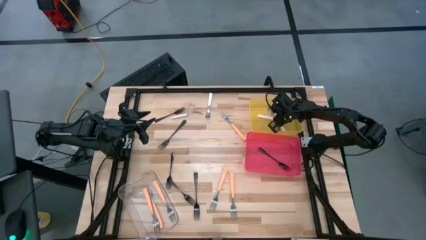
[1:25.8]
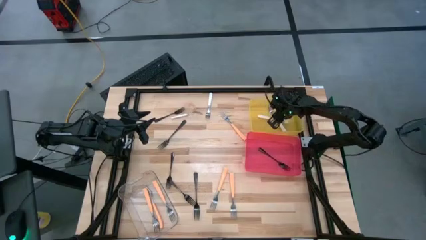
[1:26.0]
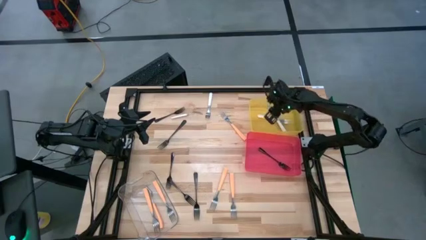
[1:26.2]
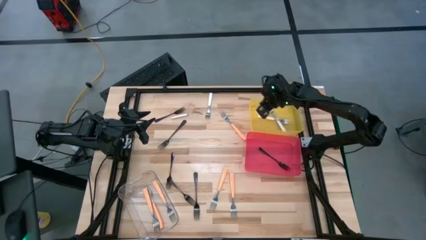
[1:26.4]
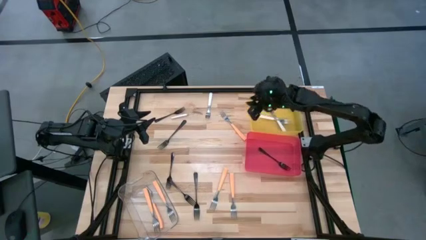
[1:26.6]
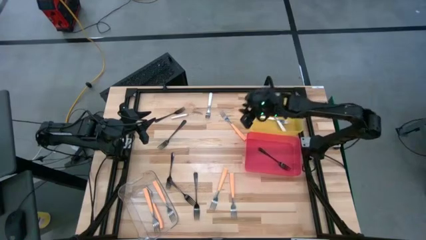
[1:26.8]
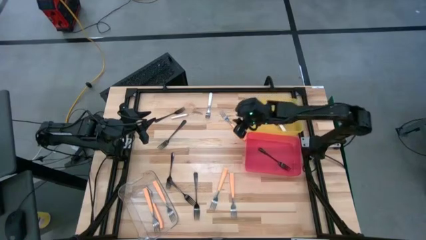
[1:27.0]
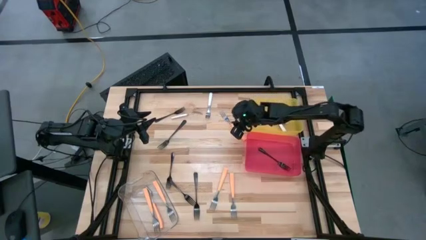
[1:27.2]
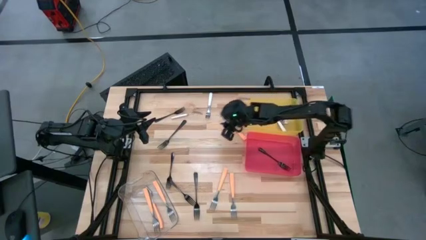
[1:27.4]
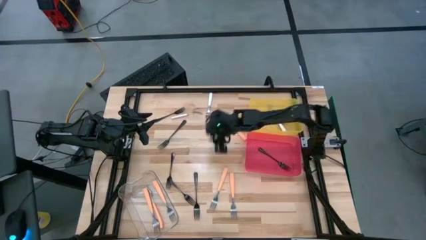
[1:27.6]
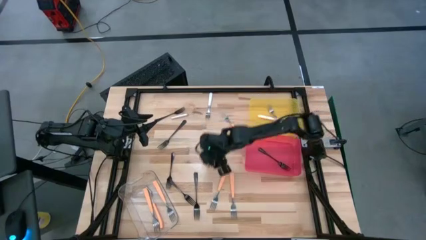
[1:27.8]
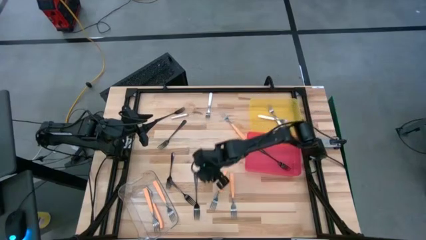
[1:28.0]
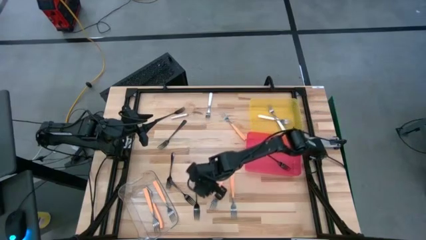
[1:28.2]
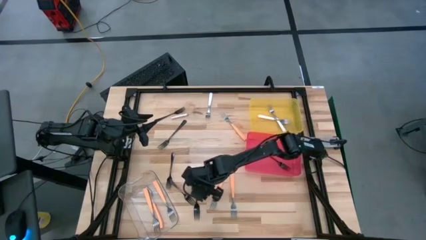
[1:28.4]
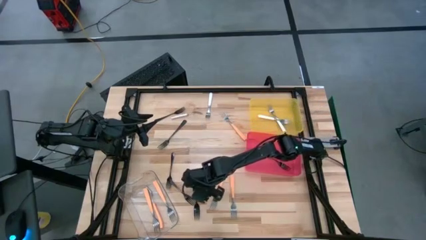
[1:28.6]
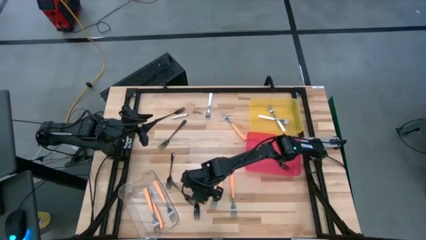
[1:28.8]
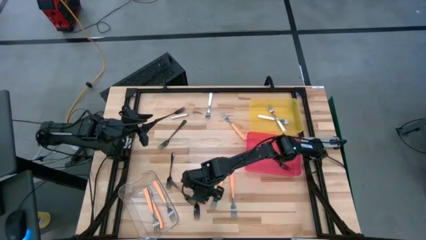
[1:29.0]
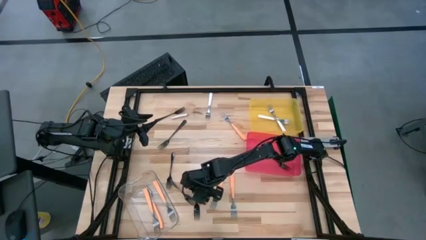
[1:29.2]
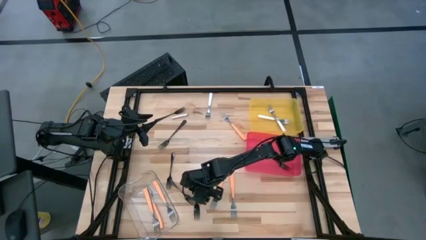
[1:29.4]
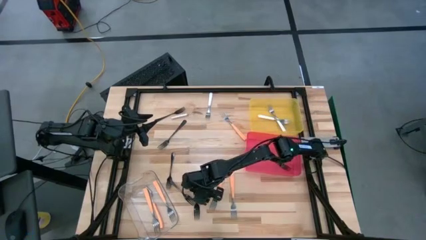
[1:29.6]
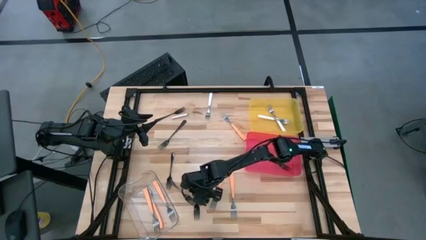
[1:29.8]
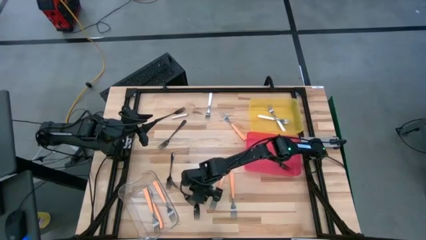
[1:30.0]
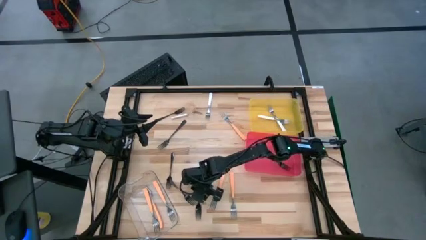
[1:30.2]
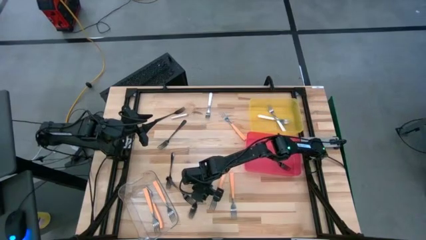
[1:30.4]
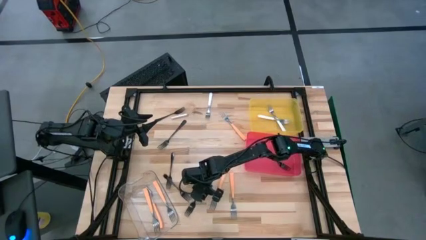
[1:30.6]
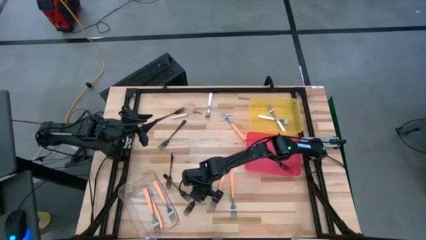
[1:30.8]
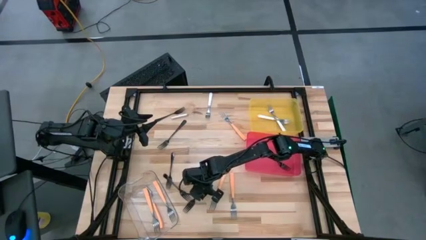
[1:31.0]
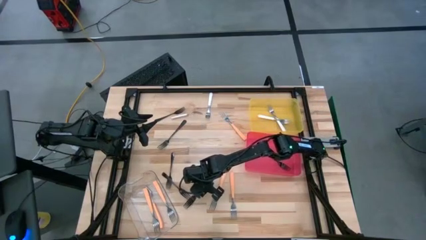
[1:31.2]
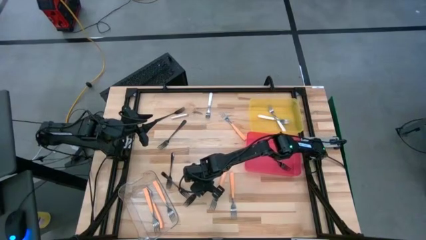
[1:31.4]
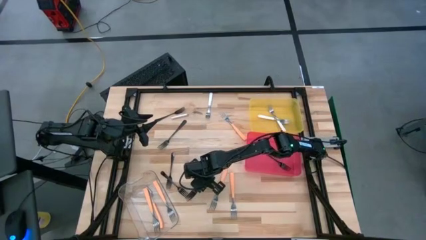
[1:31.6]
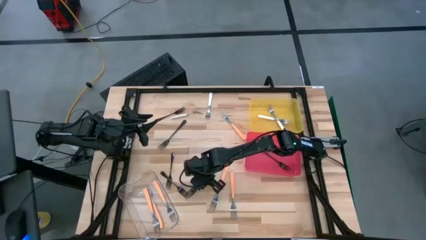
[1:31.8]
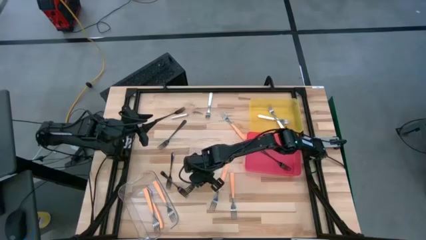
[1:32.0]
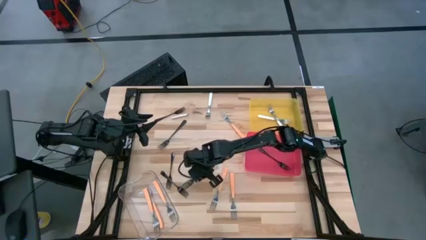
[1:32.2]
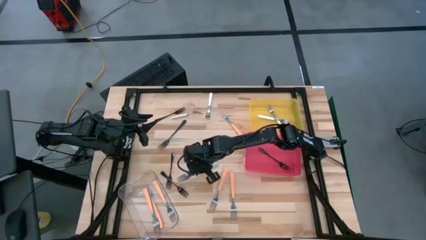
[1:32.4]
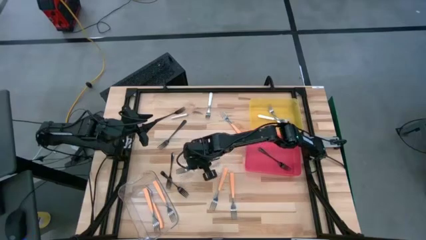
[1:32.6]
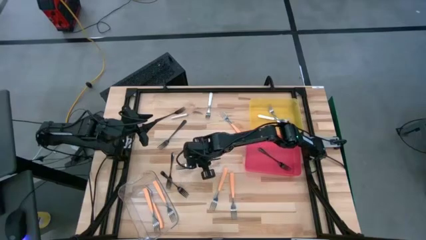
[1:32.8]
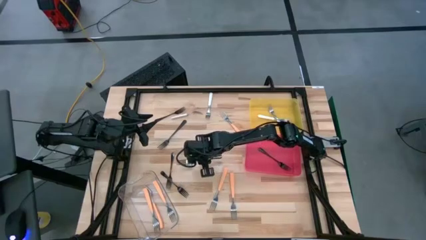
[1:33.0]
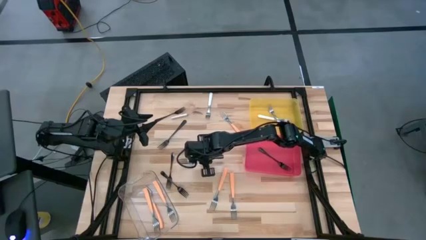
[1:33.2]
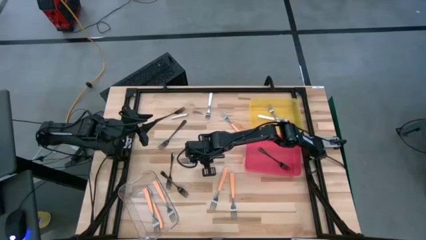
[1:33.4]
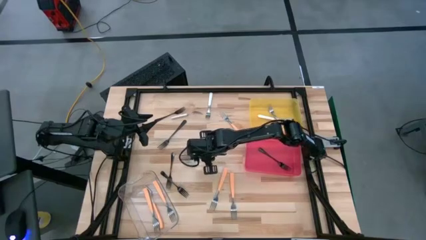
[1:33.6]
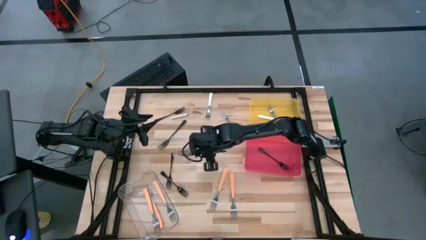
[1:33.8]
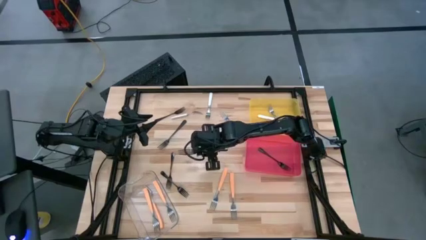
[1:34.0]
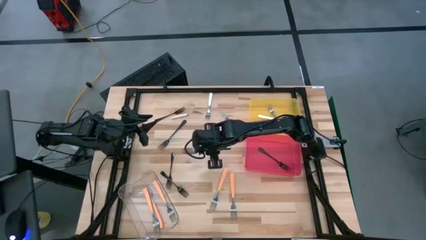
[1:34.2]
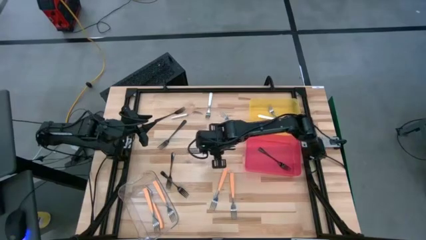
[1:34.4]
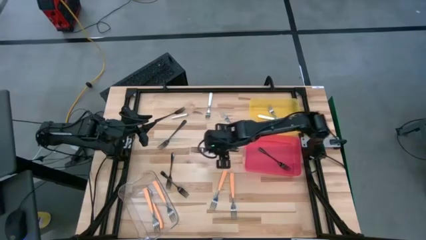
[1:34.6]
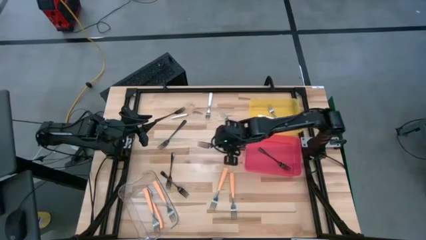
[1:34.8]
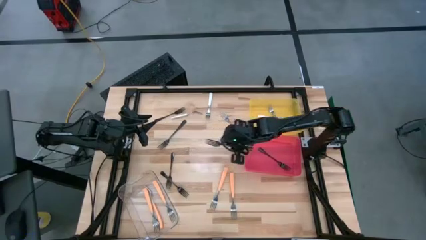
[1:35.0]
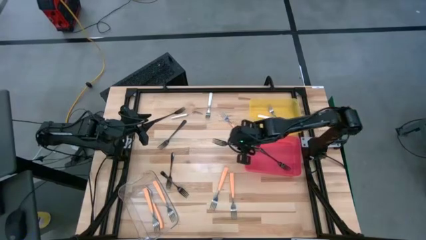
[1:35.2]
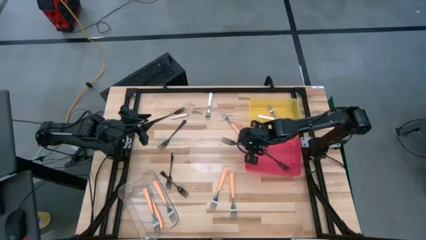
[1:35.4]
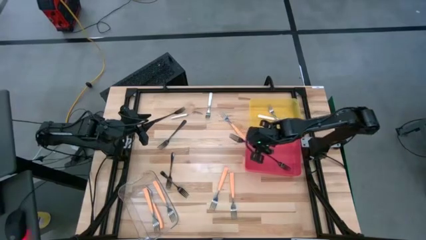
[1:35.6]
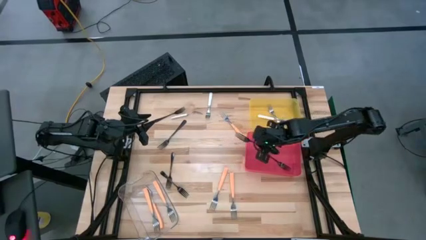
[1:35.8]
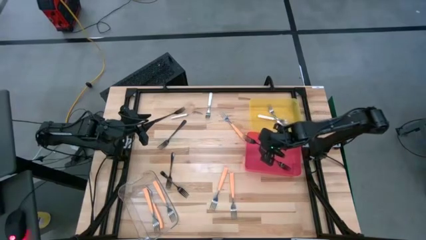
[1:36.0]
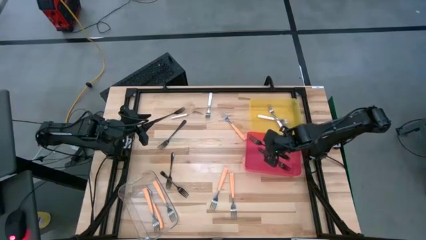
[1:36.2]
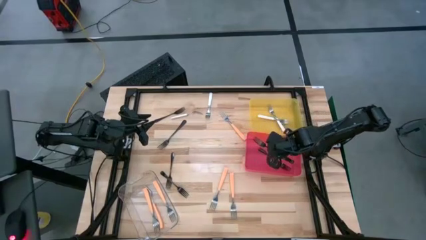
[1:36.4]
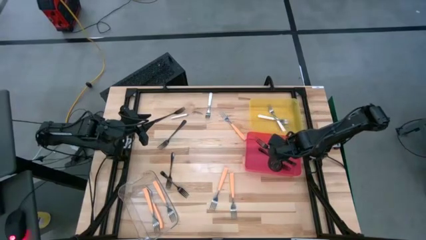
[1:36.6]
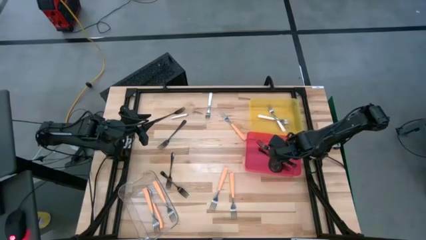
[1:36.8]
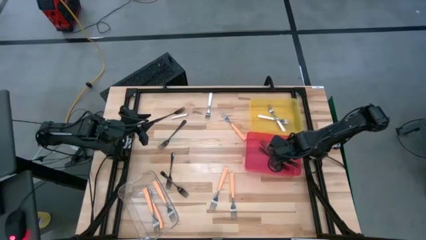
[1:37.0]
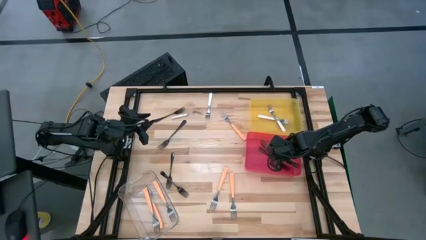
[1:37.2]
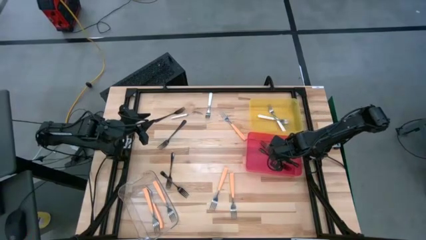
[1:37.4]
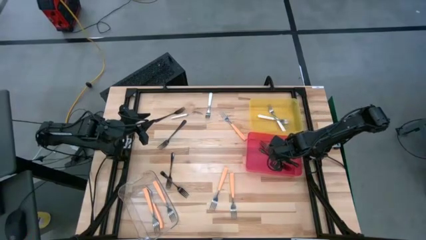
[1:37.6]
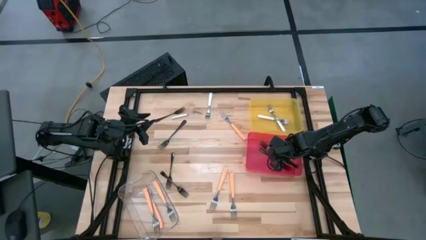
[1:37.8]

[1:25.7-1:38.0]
Task: Sort silverware by color (type)
Put the black fork into the red bin
